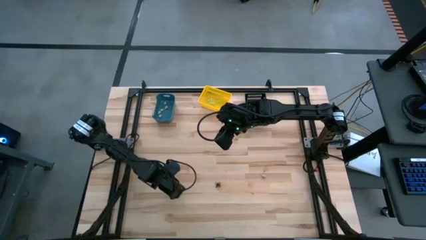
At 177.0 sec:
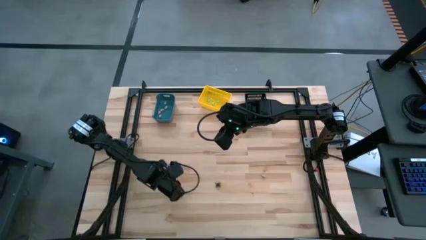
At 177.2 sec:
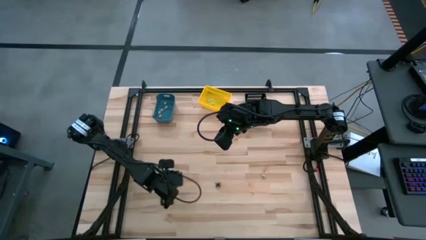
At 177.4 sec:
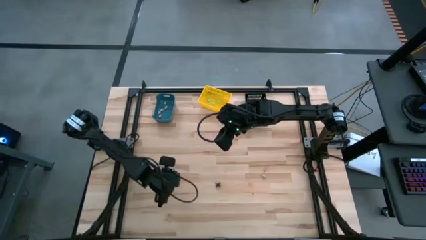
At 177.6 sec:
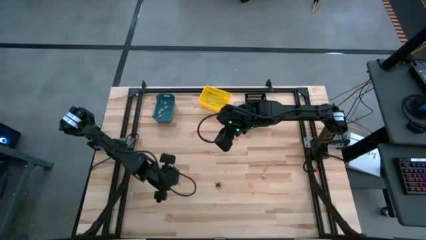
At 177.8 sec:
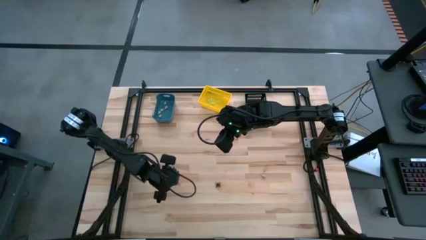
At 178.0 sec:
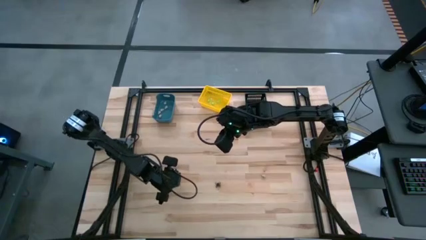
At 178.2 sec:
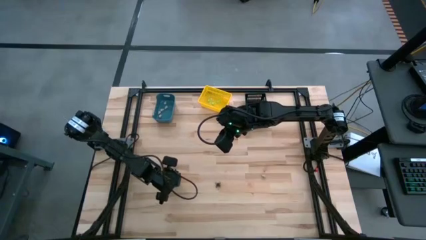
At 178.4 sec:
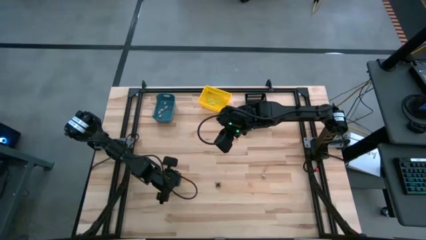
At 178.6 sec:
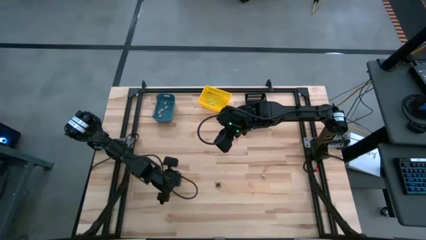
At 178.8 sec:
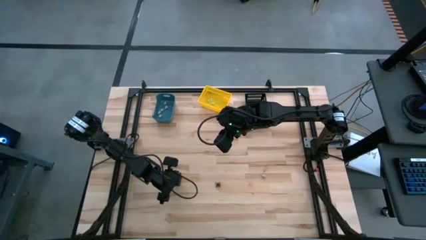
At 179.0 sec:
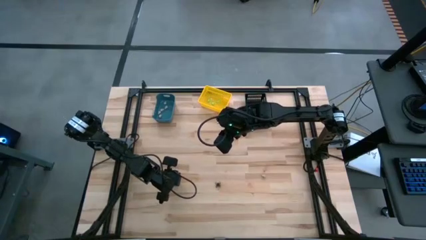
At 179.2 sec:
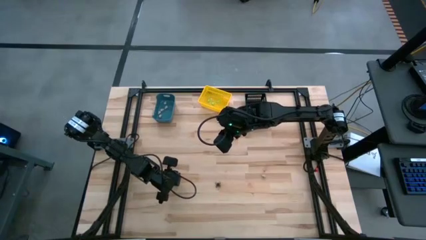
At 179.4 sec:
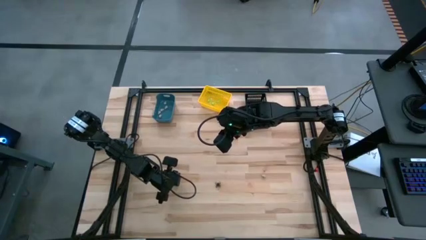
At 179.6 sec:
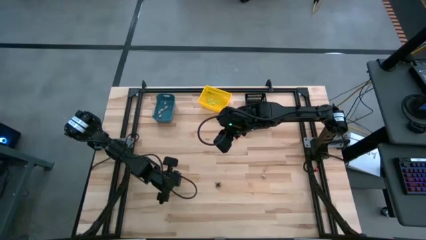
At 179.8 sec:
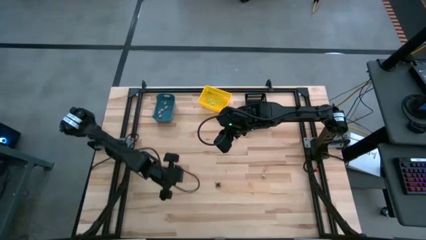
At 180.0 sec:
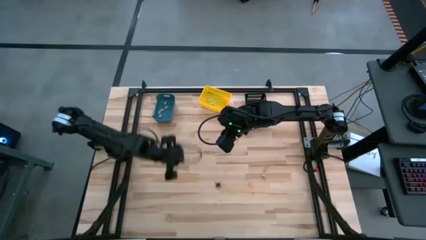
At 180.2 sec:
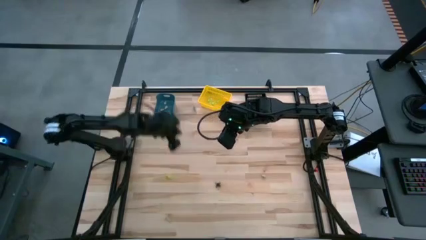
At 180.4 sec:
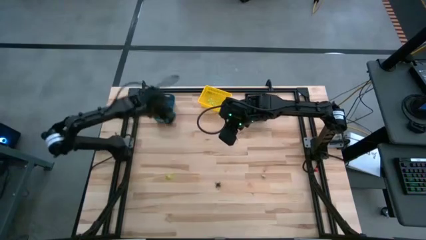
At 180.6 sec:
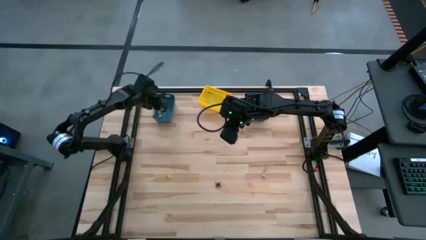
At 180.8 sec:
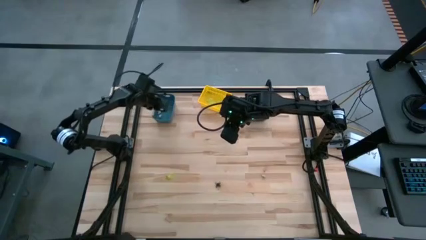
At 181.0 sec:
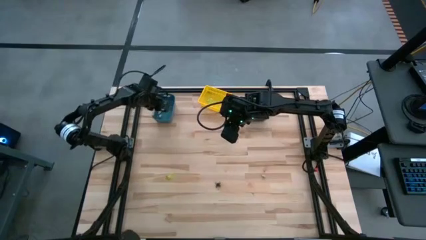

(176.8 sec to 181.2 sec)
Task: Sort Halloween decoration
Put the gray skull toy into the blue bin

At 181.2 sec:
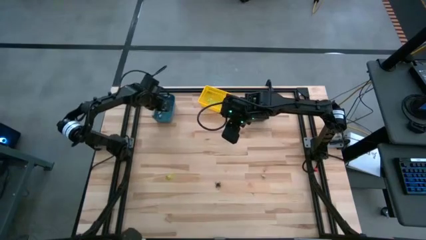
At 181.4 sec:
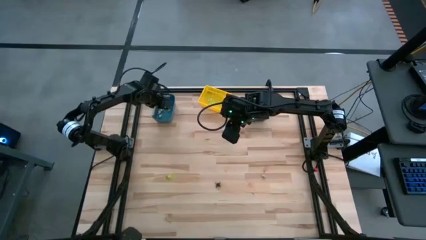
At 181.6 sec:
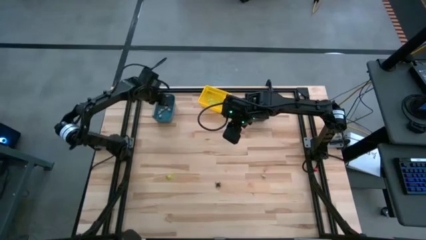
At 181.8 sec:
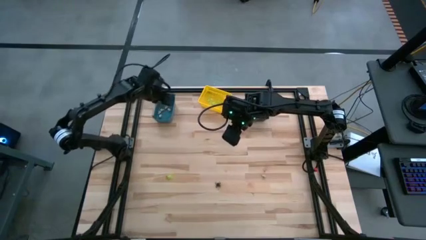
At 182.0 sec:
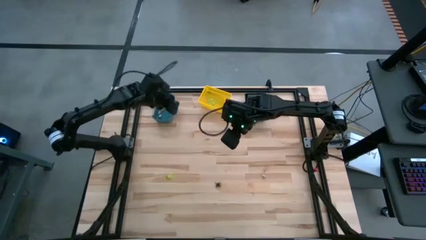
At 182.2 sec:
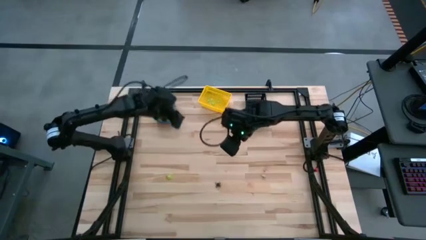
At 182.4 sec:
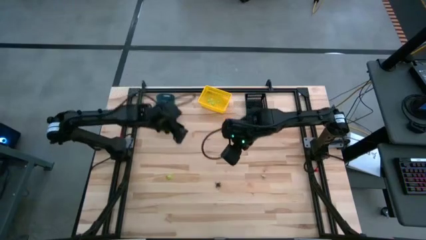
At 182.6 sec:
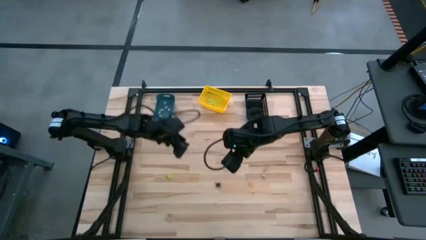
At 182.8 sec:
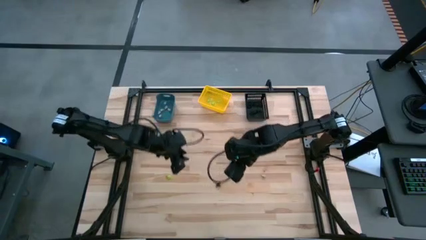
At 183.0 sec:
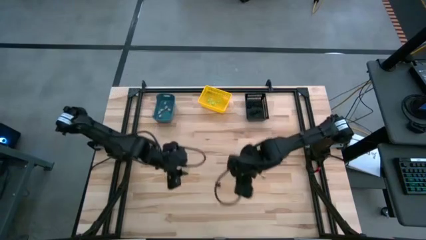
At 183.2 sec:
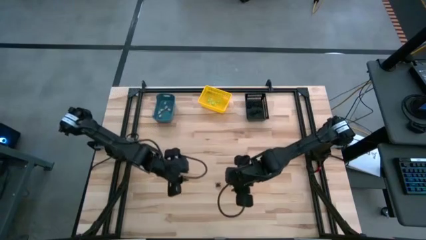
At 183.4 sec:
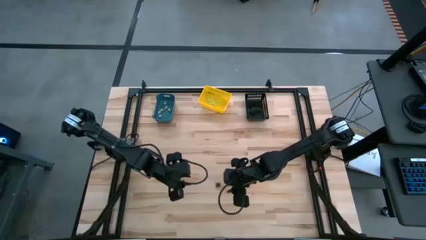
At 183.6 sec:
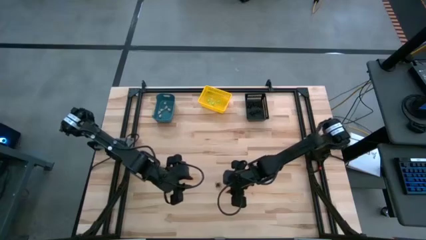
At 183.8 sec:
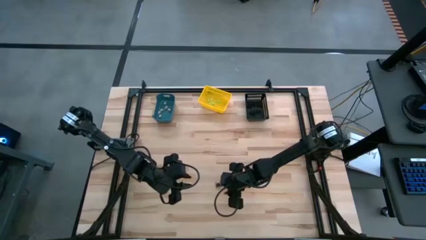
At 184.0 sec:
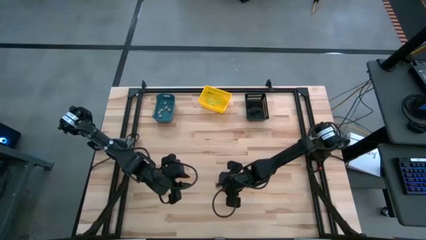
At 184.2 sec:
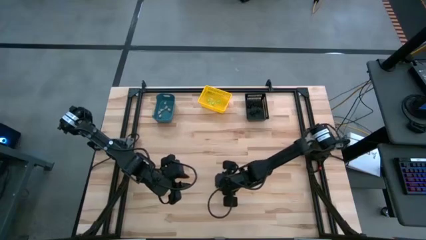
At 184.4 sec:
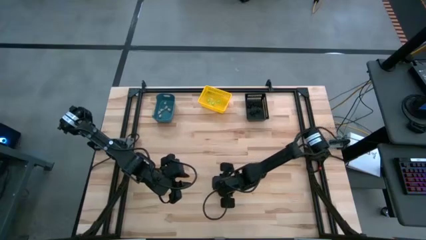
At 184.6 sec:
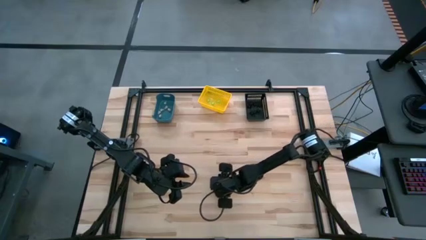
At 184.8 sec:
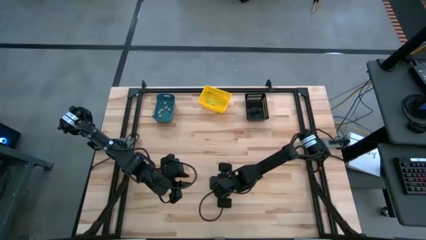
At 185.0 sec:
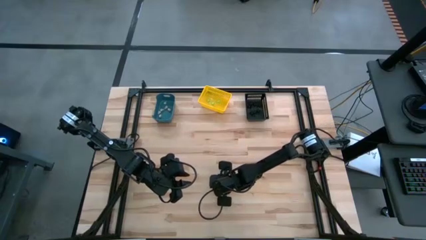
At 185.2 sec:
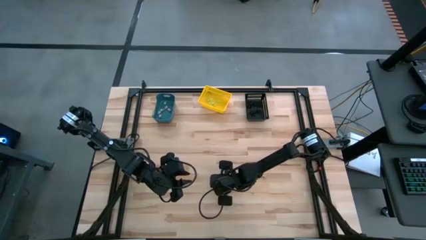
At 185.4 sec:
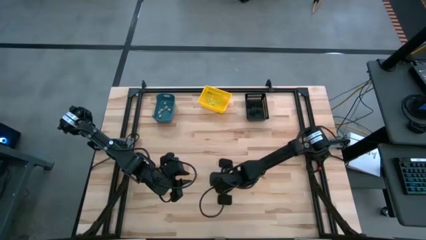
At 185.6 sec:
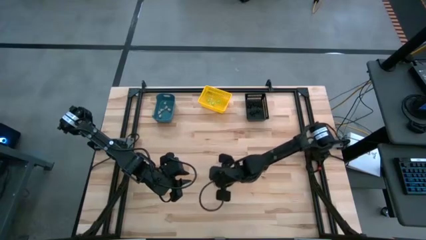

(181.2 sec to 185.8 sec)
Put the black spider toy into the black bin

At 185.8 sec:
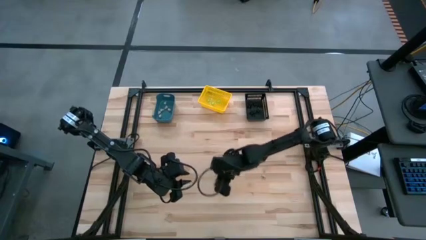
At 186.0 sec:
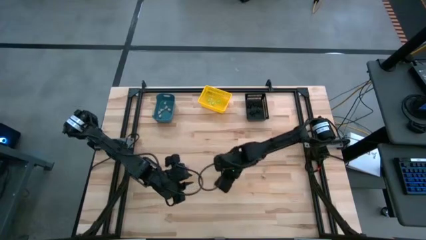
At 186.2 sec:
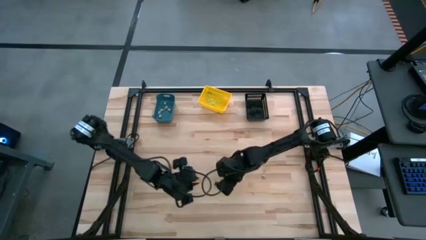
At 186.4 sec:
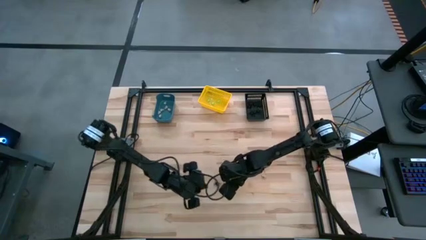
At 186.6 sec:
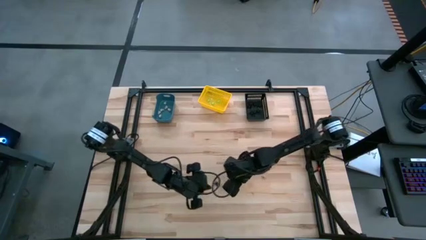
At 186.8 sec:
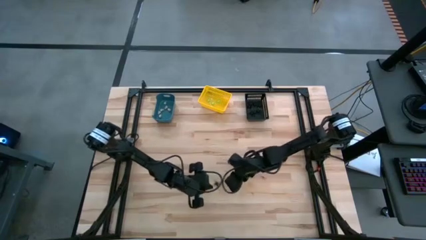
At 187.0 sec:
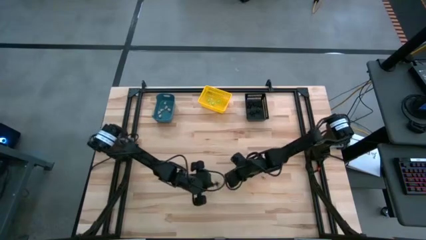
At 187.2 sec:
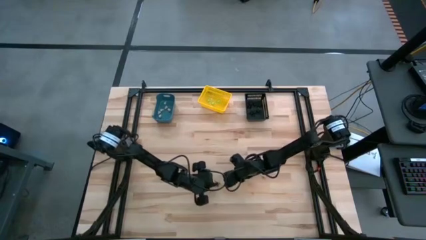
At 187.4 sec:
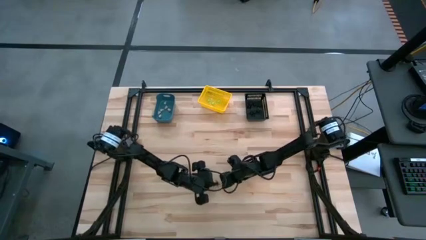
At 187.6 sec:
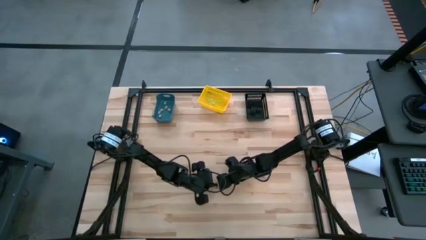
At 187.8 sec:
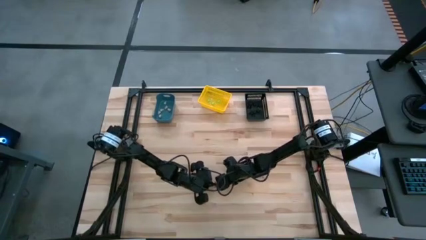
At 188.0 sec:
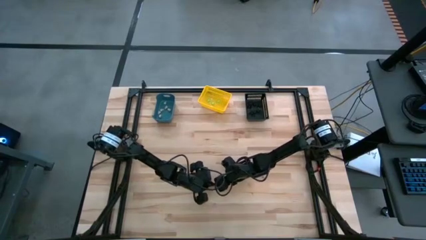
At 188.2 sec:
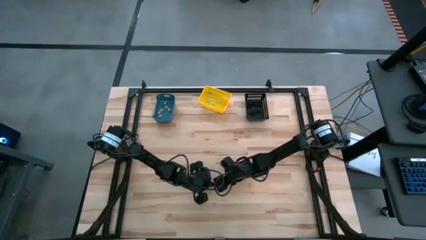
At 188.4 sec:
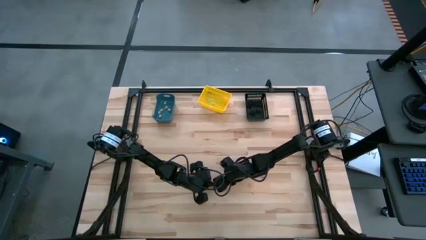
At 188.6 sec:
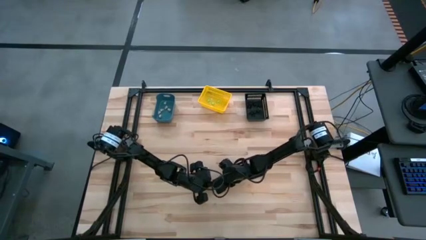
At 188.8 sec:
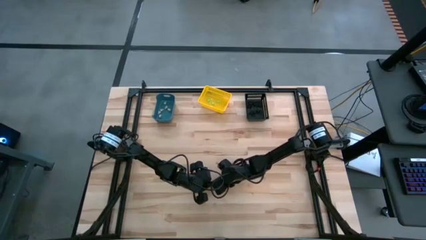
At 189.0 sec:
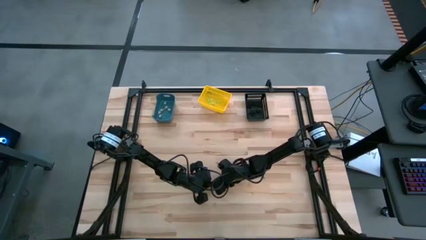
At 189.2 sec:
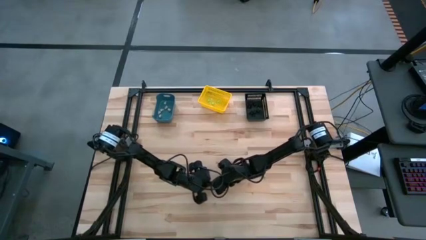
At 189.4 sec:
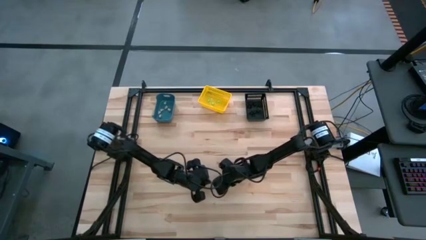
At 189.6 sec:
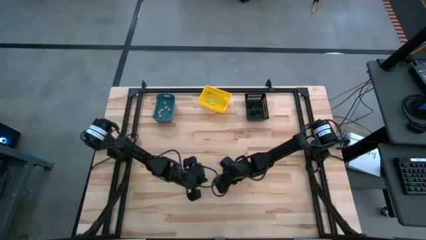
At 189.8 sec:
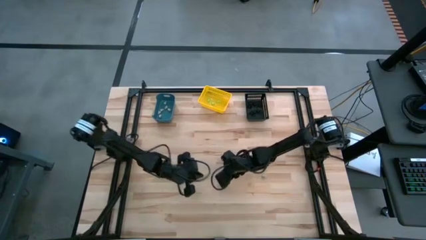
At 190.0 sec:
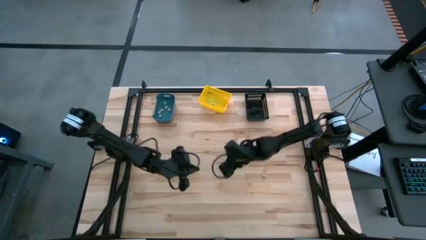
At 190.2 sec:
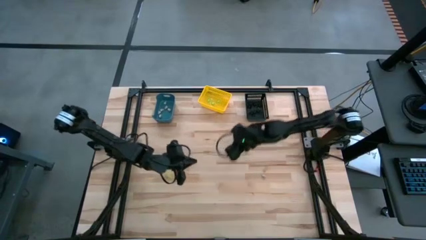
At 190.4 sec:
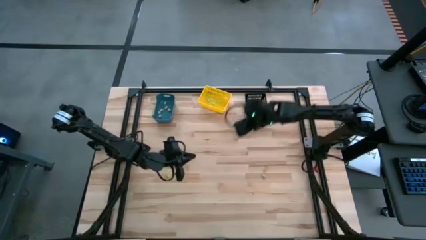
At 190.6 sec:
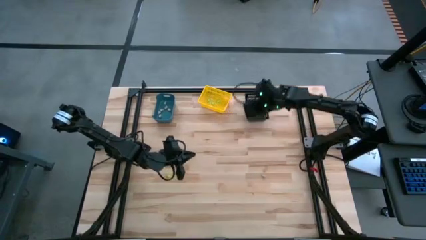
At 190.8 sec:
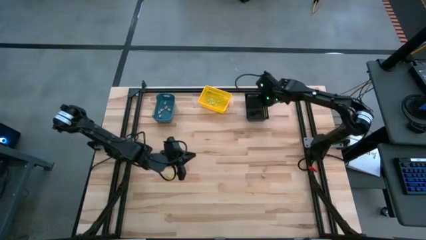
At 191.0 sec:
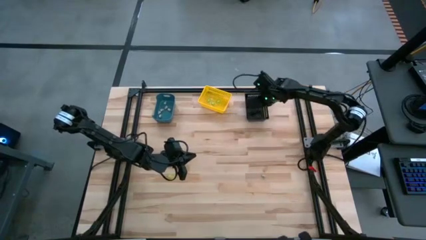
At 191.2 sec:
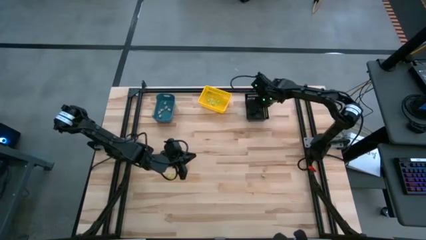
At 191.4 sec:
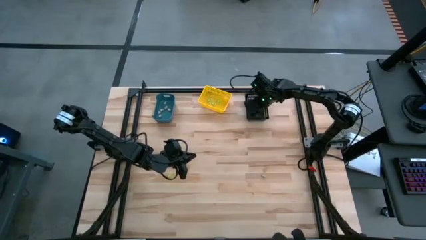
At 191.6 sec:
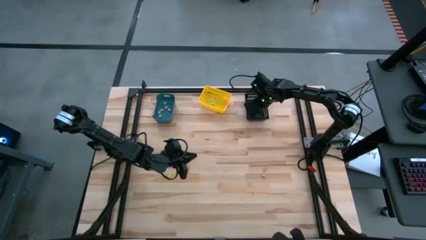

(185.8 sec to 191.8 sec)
Put the black spider toy into the black bin

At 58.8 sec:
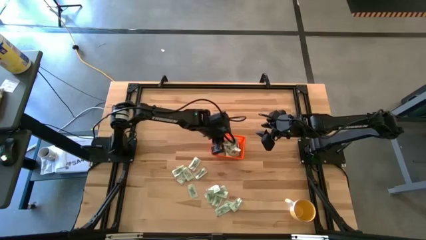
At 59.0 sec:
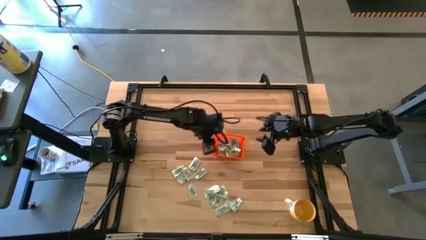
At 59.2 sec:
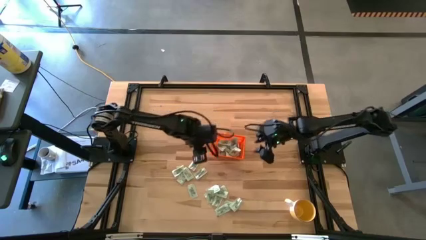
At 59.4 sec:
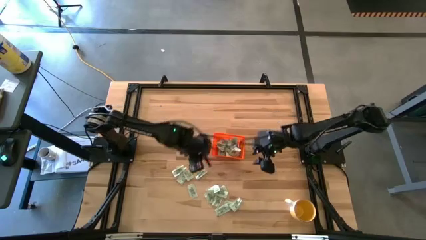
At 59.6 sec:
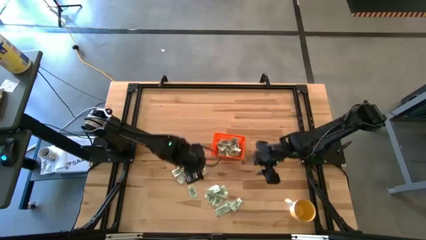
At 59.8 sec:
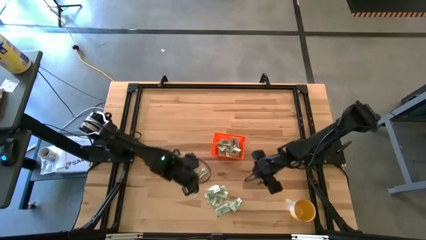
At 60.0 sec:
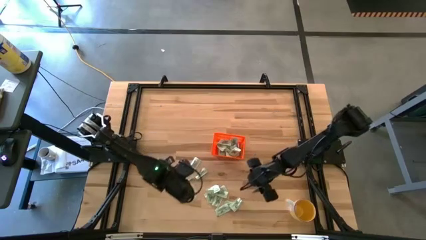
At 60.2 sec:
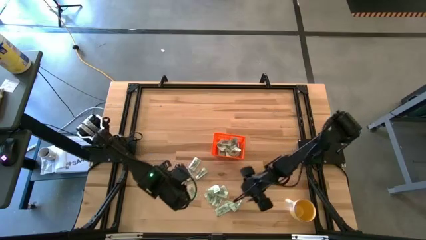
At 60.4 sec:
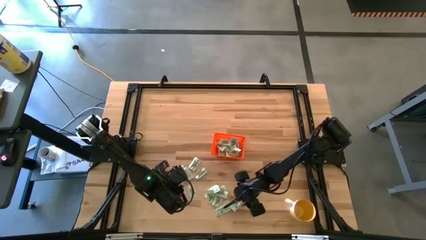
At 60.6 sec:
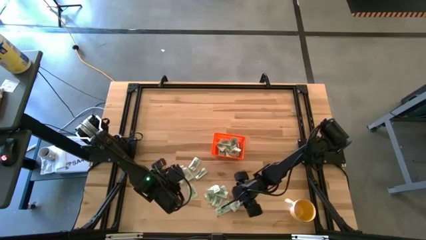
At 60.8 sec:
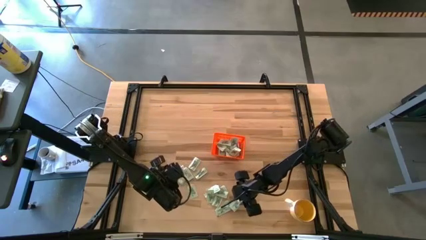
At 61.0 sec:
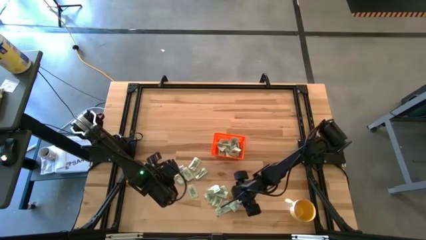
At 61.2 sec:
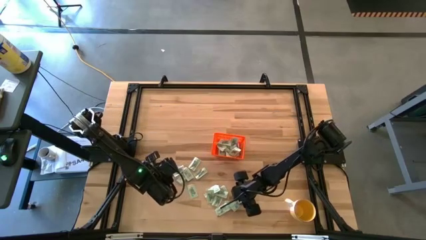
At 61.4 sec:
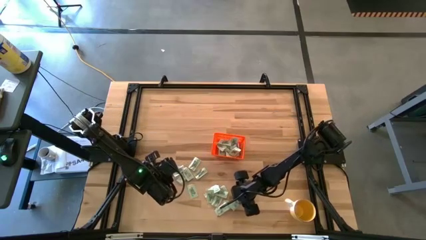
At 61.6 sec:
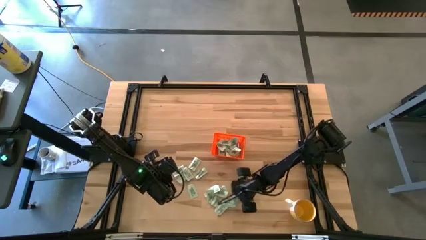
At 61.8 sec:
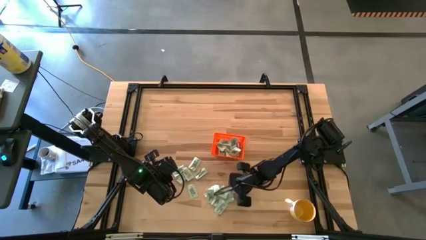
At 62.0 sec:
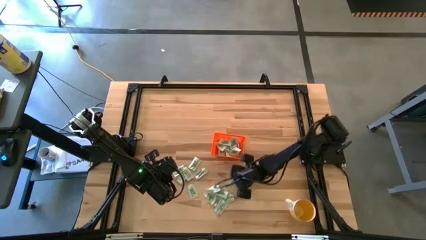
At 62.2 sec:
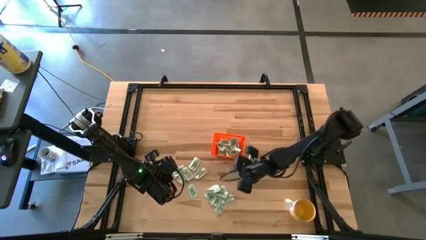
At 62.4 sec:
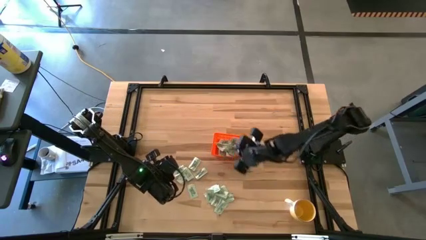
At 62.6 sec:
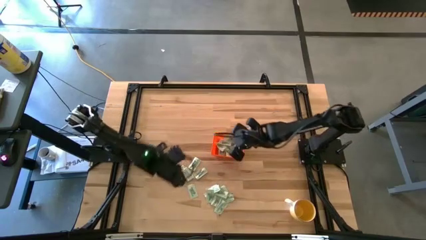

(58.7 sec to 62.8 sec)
Task: Pick and place Stevia / Truvia into bins
Put the white stevia packet into the orange bin
